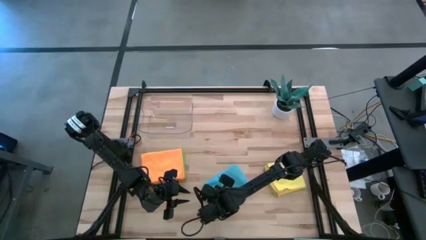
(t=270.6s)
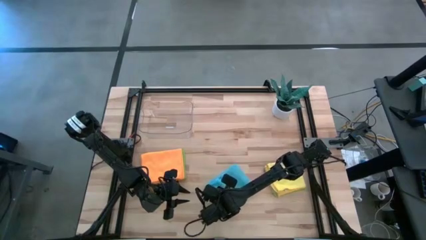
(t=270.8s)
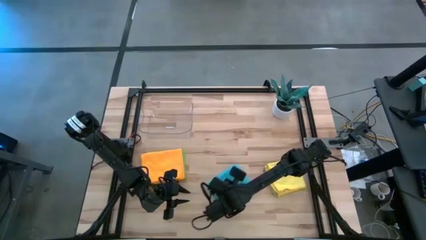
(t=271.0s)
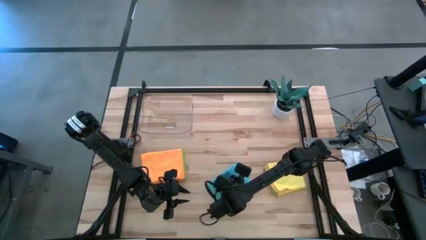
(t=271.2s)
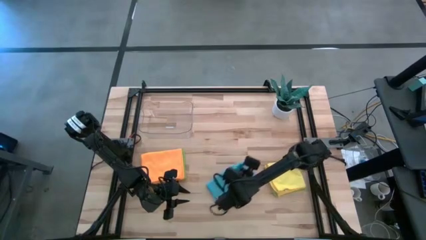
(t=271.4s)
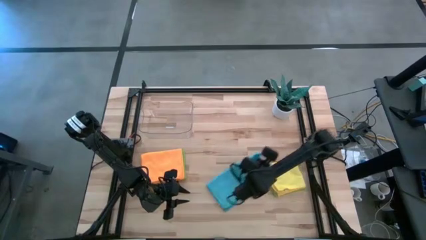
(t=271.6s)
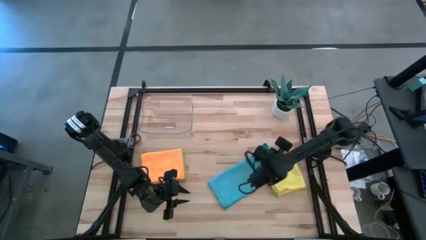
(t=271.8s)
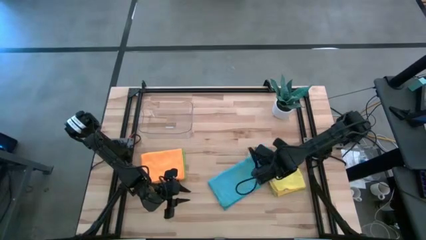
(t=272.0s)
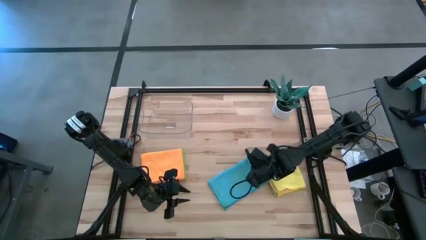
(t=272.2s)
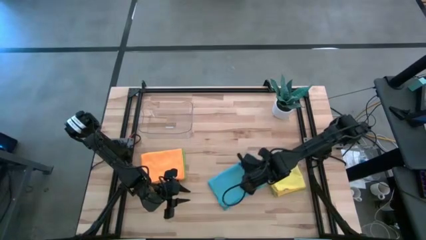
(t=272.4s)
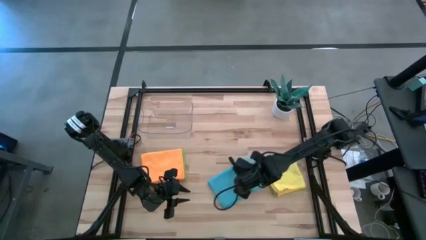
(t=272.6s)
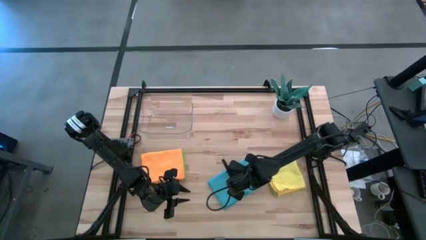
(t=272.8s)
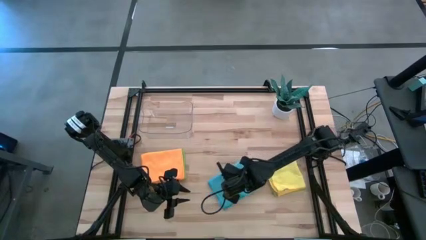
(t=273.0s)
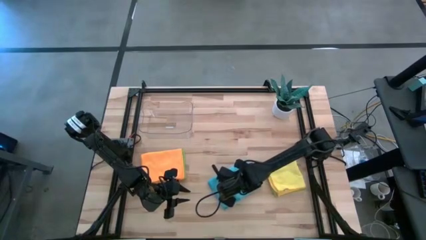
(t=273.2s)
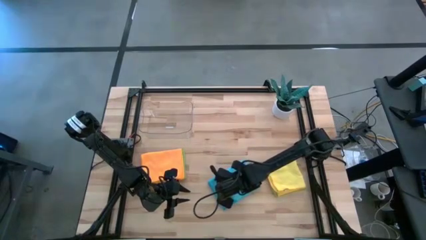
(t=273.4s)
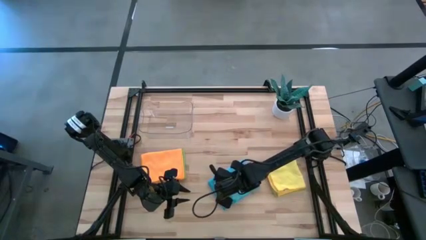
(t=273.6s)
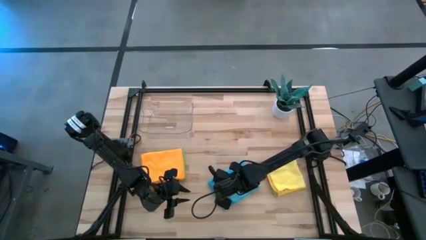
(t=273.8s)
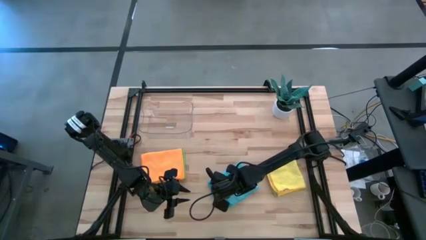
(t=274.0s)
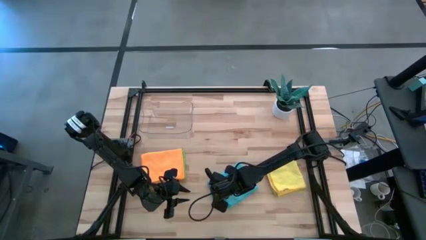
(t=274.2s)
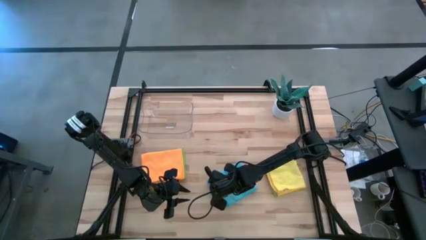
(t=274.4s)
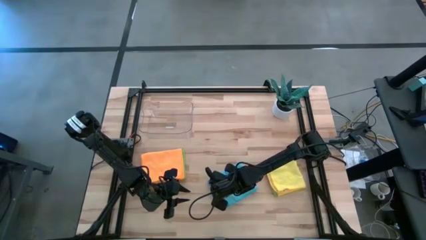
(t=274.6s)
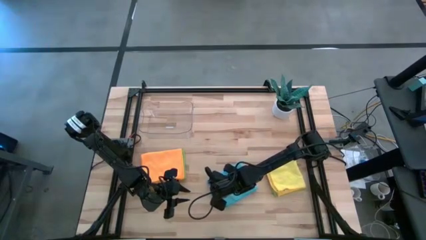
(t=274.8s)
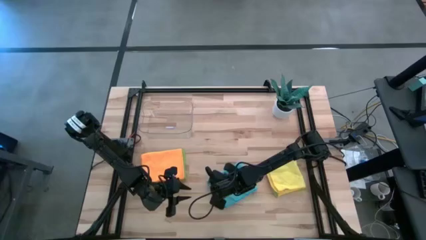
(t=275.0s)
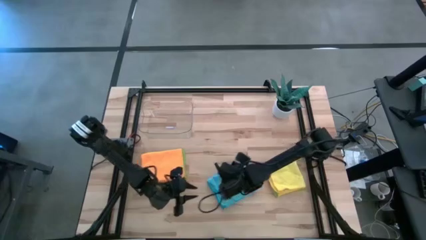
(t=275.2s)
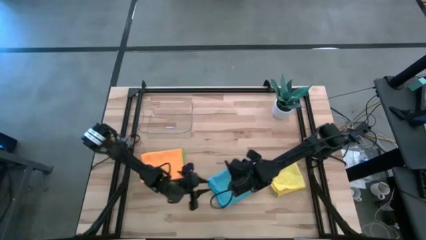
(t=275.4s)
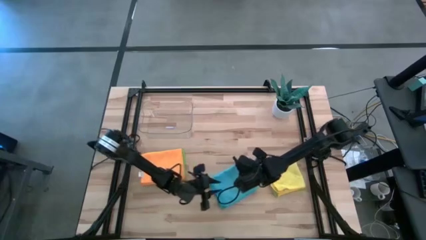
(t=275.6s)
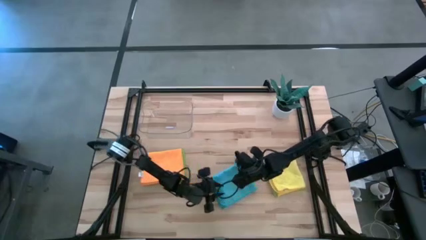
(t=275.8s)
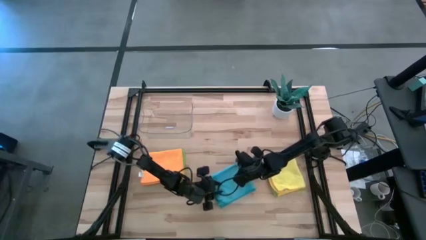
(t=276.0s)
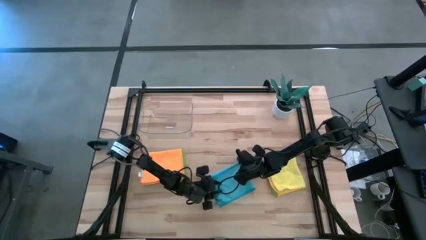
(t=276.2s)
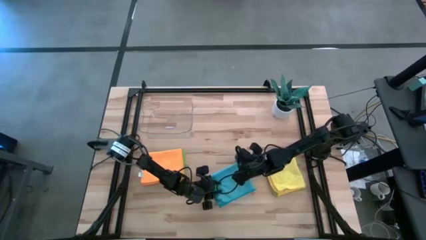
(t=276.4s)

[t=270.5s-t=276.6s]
Task: Fold microfiber towels
Fold the blue microfiber cloth

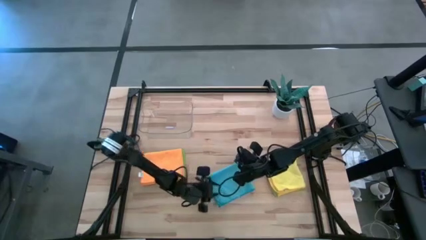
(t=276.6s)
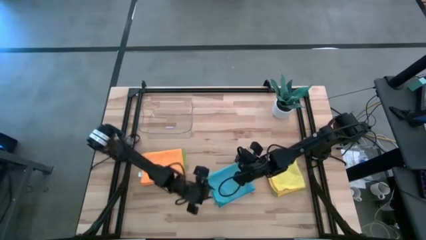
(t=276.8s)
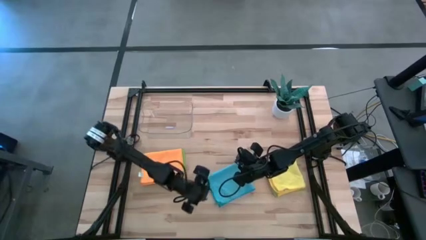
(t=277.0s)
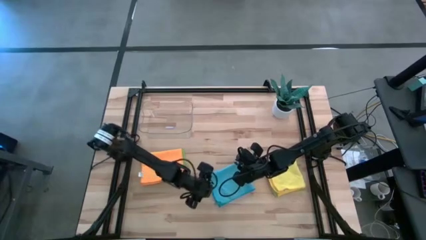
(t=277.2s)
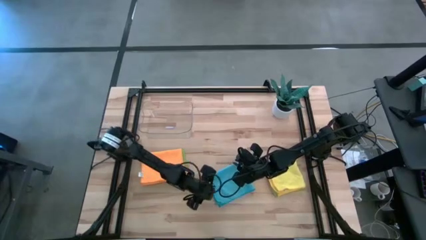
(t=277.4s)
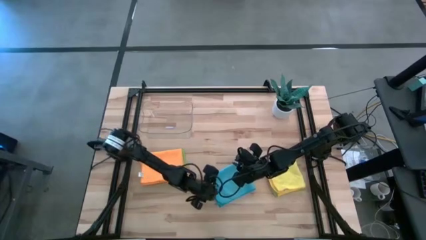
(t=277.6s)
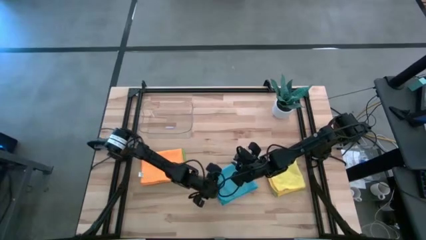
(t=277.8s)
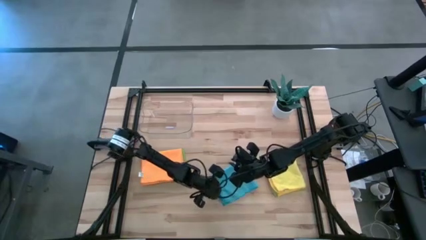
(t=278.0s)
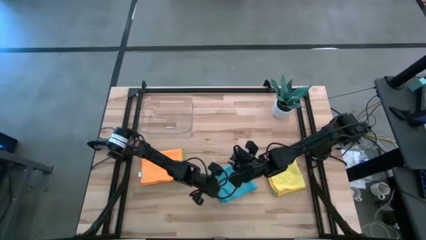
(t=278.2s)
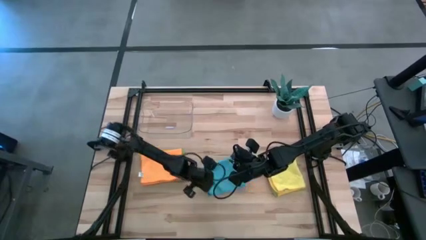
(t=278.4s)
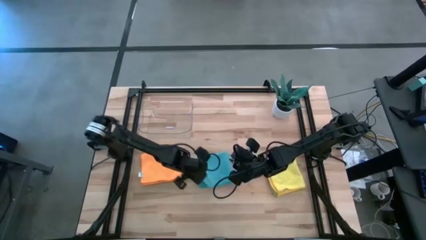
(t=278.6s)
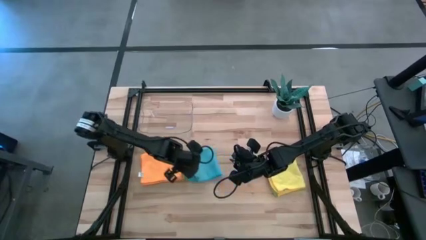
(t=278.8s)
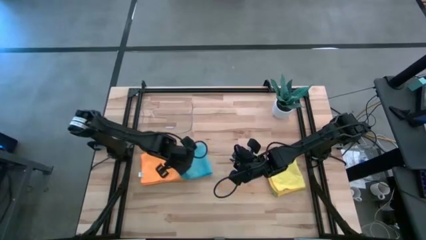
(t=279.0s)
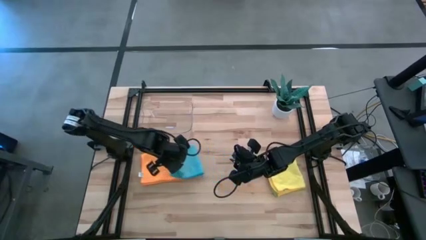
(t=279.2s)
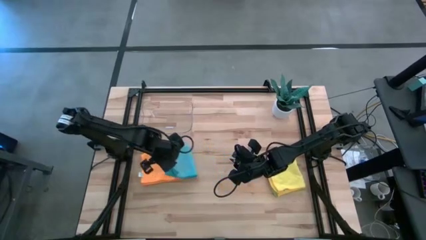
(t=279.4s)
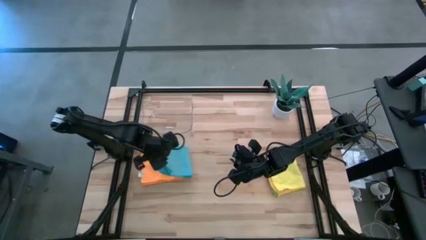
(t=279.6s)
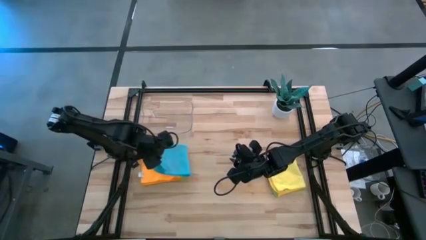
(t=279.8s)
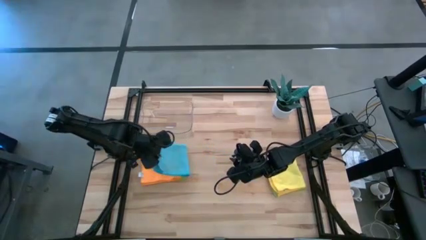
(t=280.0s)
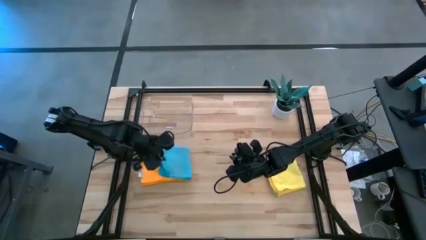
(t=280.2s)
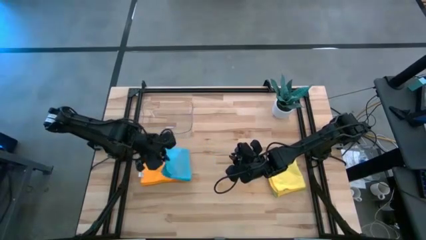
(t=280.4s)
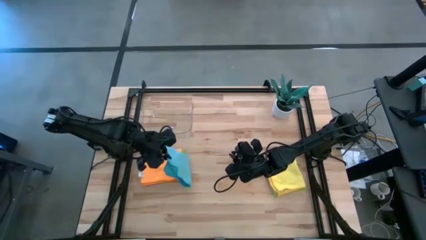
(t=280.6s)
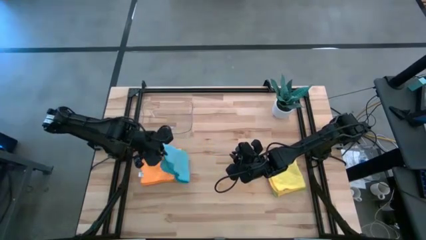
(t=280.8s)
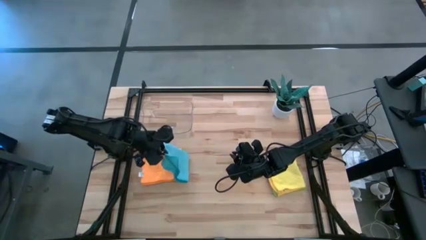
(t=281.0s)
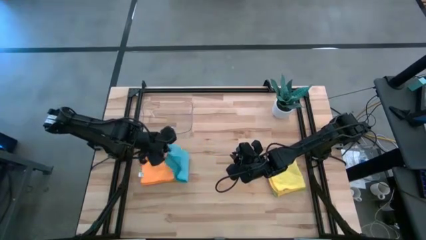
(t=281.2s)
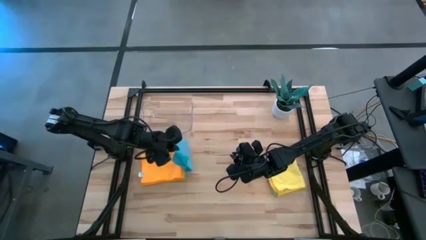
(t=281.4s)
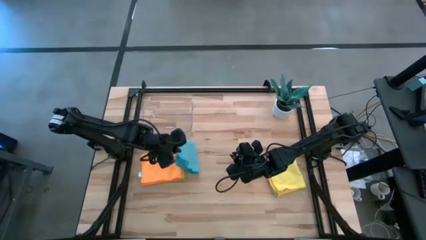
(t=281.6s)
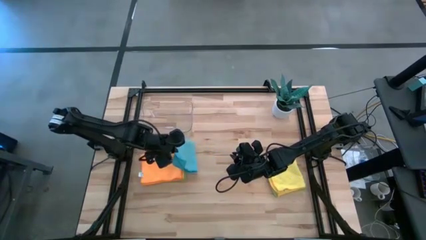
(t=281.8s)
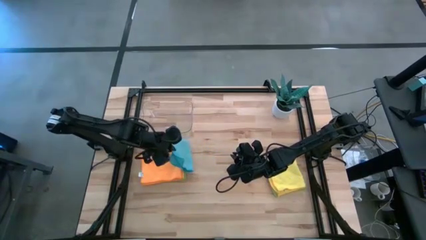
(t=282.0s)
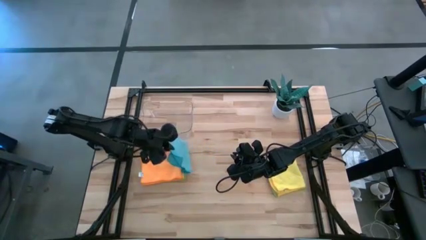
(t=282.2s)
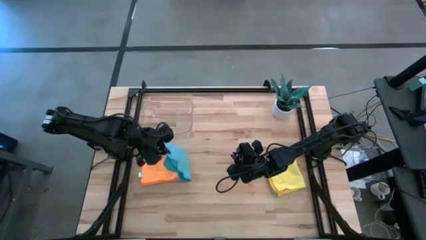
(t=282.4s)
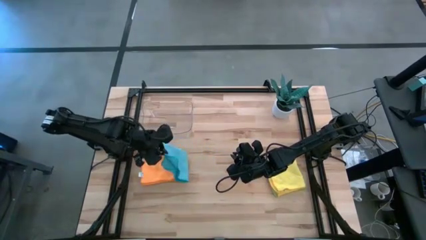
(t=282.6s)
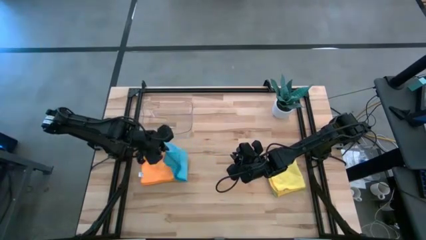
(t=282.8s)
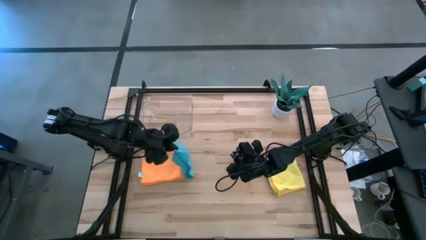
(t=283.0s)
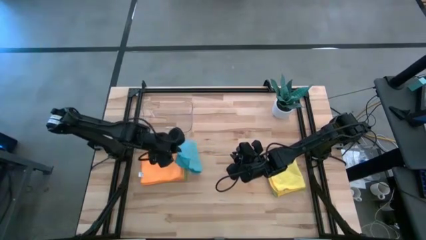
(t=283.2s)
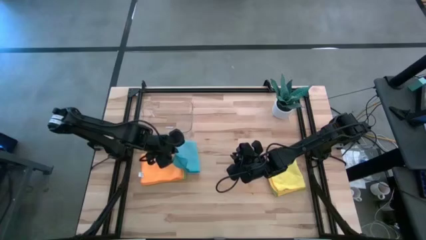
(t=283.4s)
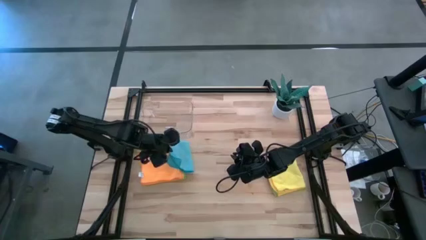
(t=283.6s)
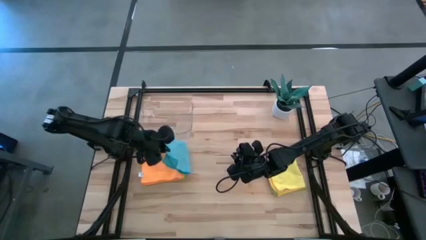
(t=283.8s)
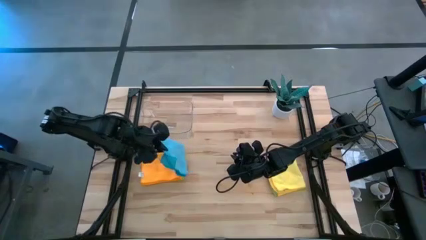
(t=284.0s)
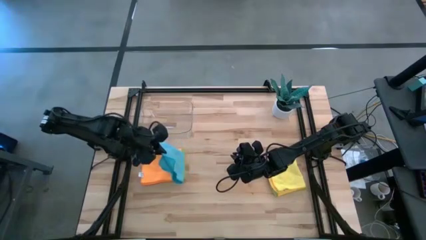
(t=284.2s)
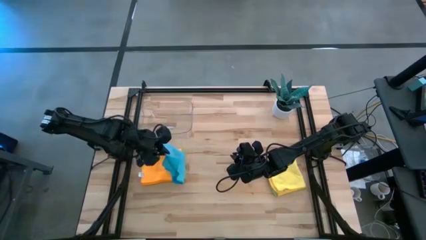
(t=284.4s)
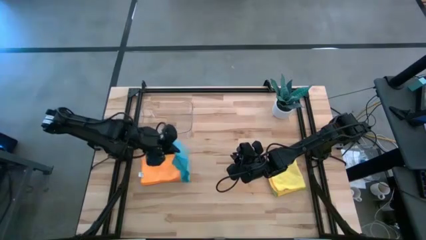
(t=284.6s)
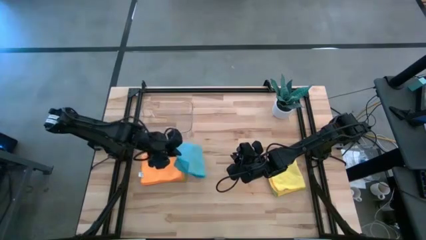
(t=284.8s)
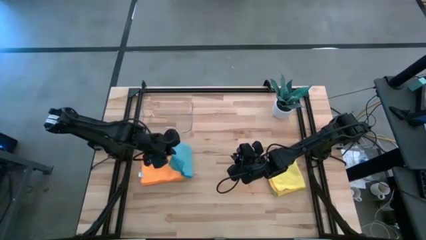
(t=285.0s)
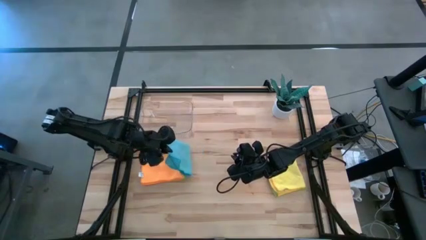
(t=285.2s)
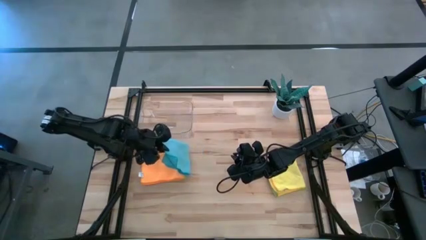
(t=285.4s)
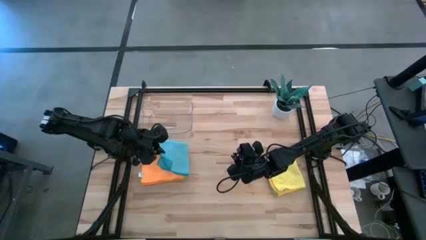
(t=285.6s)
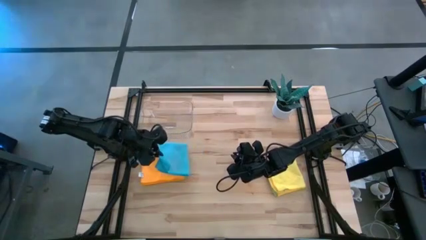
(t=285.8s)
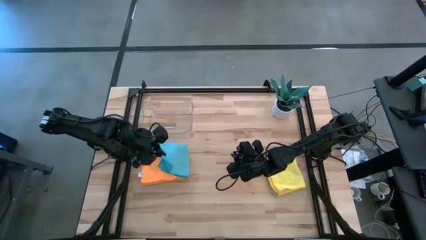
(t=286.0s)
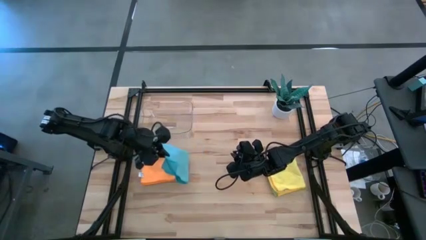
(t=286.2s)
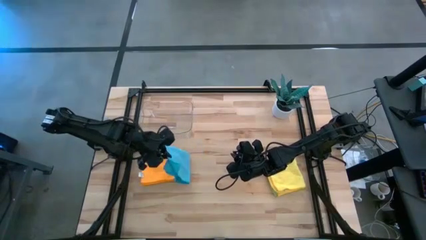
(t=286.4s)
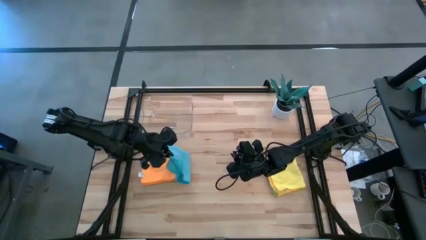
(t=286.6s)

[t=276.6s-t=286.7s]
Stack the blue microfiber cloth on top of the orange microfiber cloth
